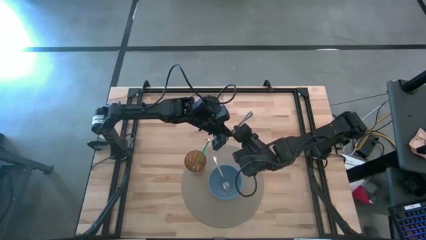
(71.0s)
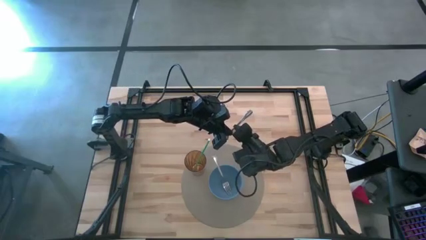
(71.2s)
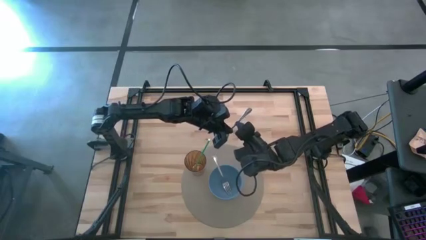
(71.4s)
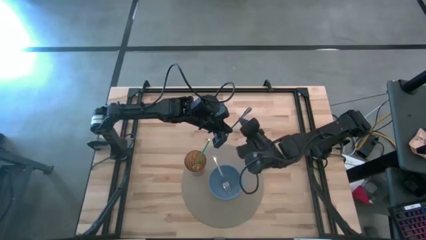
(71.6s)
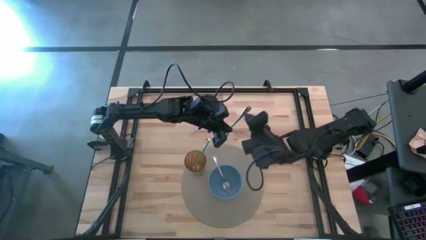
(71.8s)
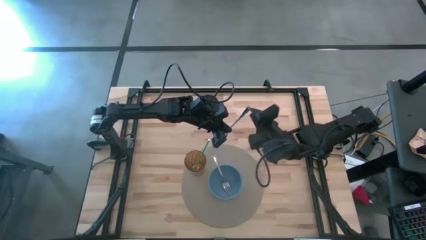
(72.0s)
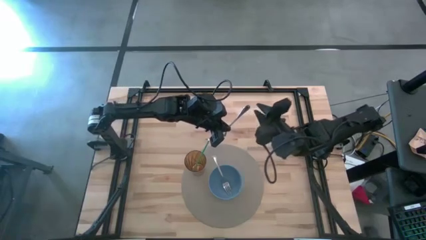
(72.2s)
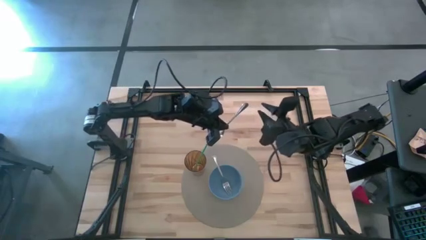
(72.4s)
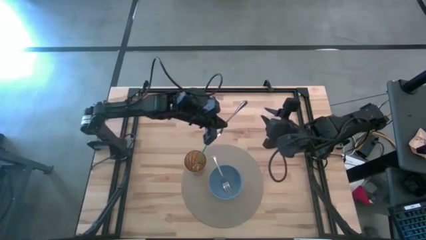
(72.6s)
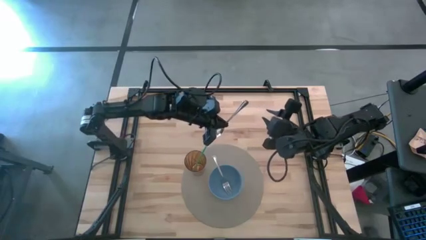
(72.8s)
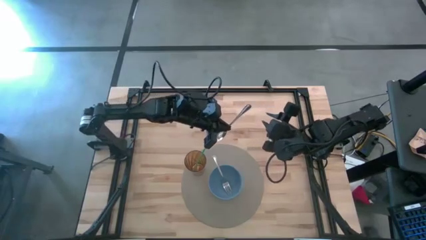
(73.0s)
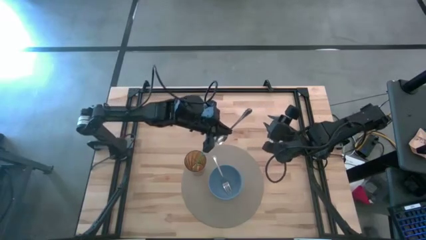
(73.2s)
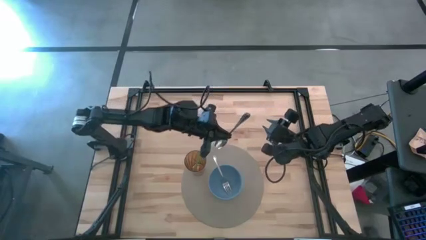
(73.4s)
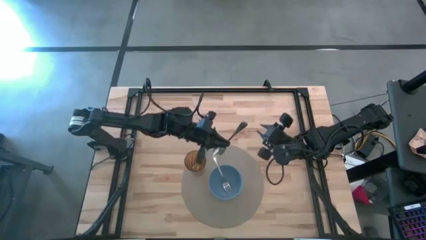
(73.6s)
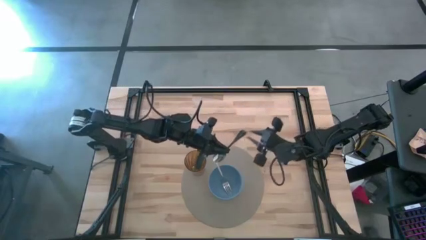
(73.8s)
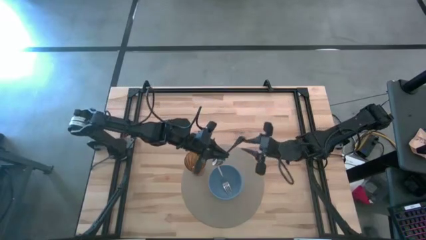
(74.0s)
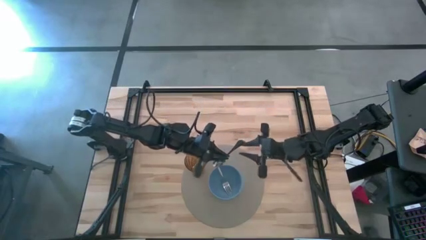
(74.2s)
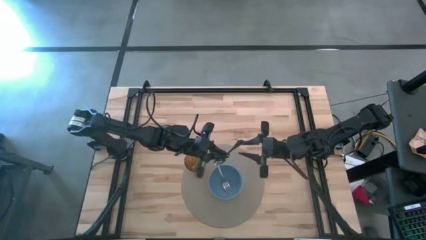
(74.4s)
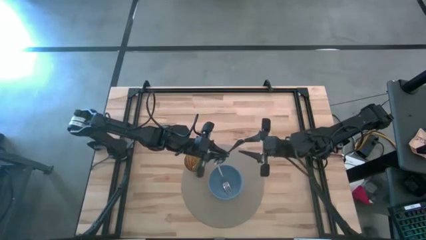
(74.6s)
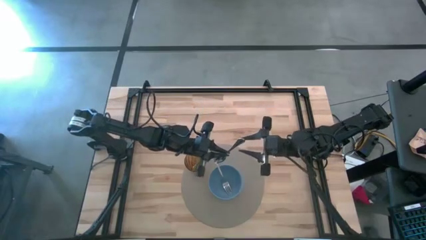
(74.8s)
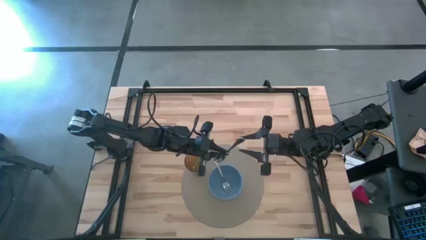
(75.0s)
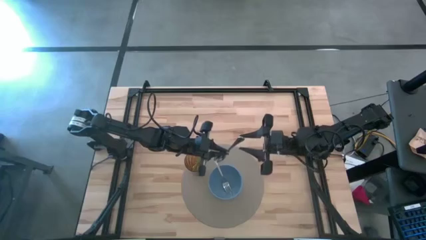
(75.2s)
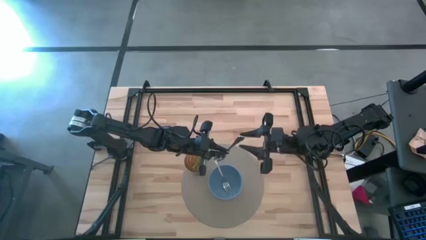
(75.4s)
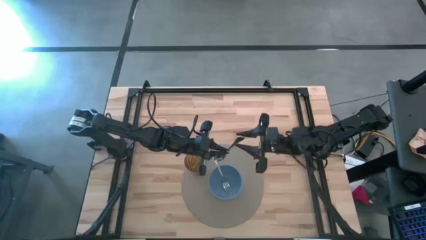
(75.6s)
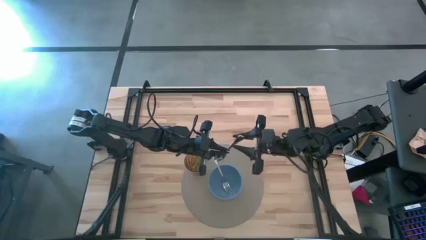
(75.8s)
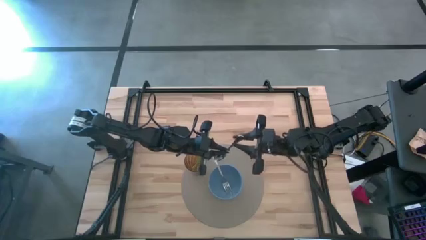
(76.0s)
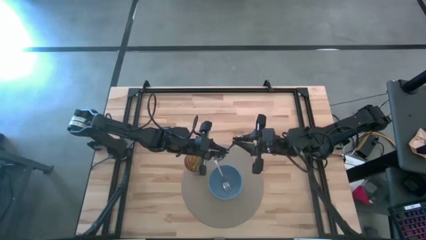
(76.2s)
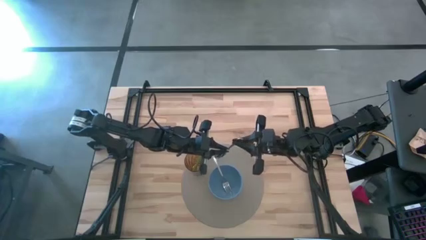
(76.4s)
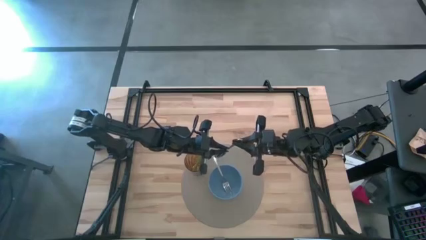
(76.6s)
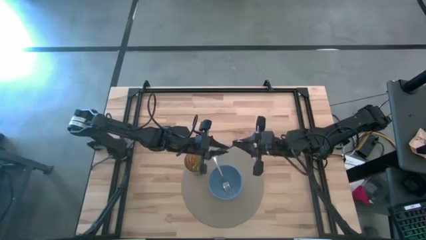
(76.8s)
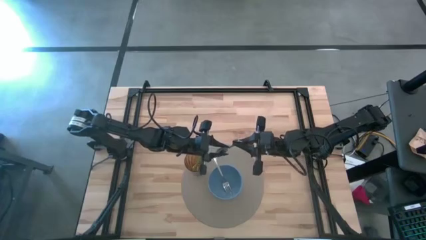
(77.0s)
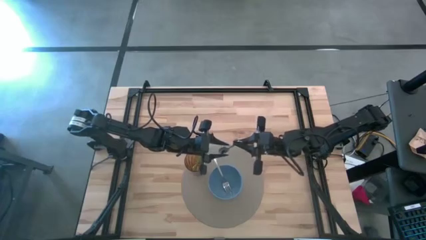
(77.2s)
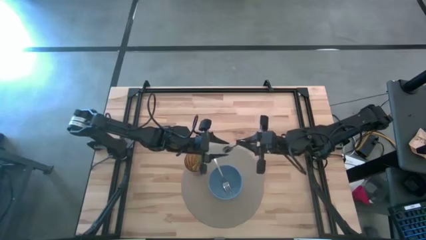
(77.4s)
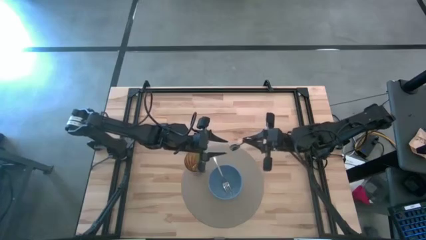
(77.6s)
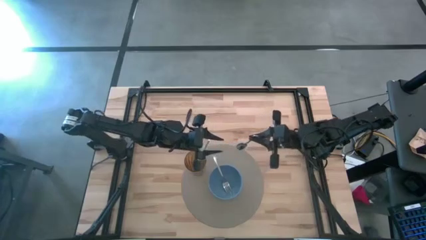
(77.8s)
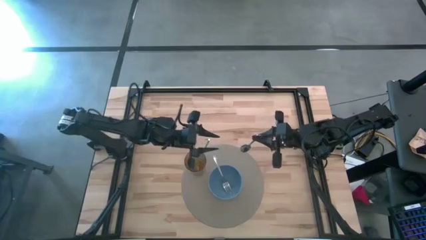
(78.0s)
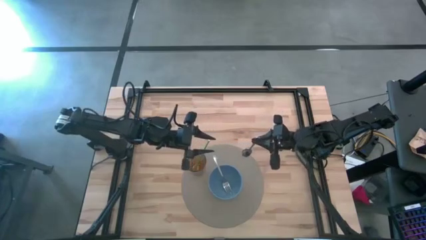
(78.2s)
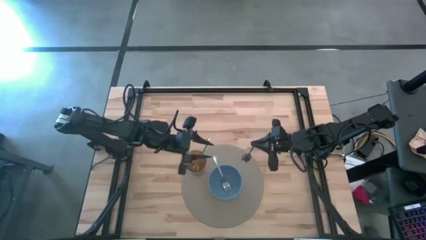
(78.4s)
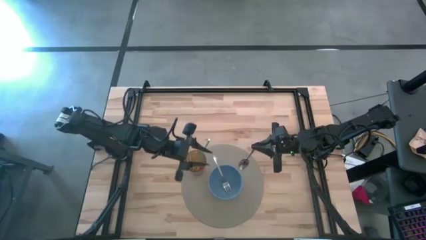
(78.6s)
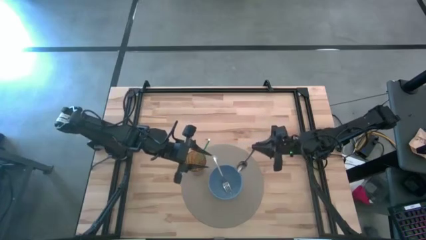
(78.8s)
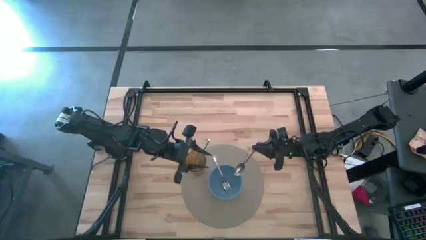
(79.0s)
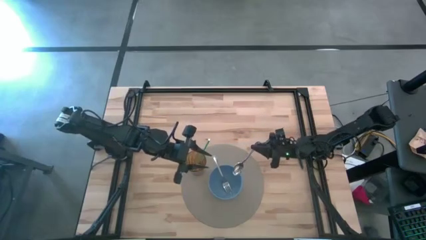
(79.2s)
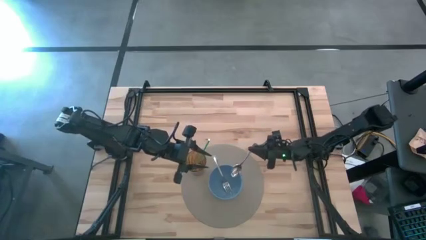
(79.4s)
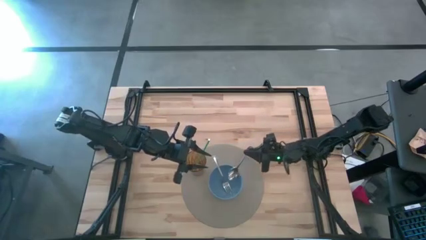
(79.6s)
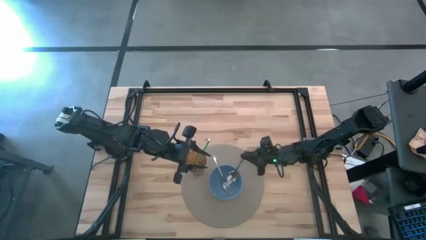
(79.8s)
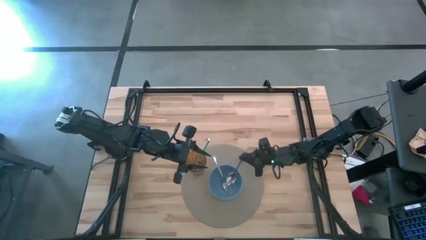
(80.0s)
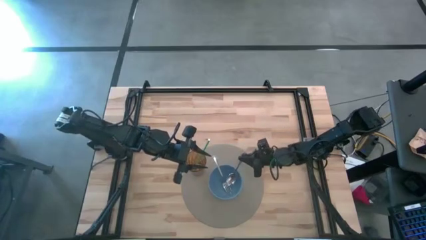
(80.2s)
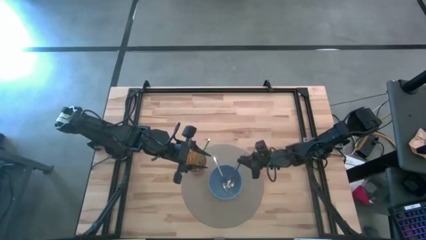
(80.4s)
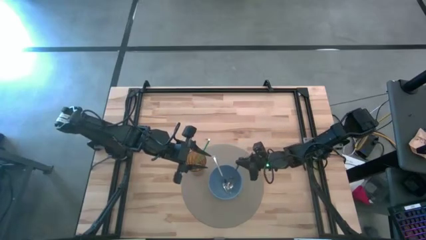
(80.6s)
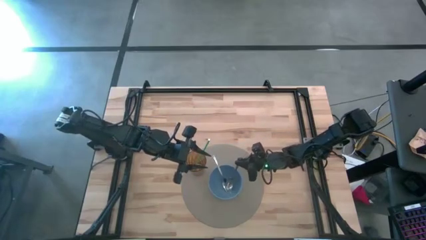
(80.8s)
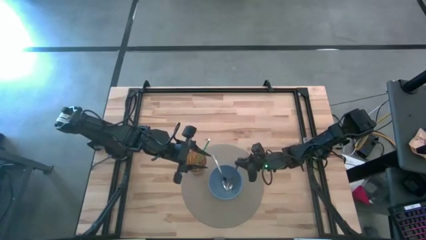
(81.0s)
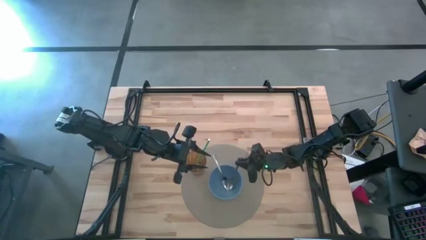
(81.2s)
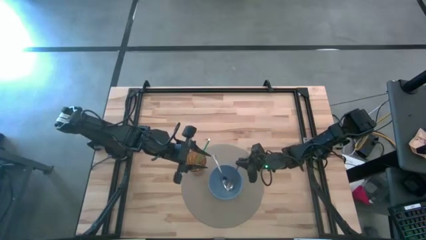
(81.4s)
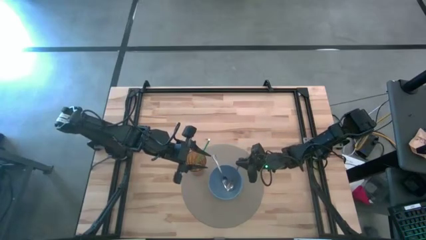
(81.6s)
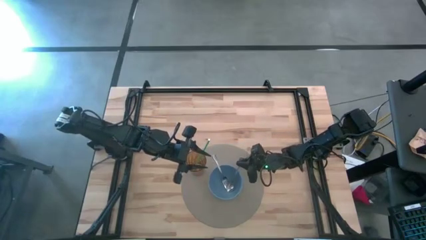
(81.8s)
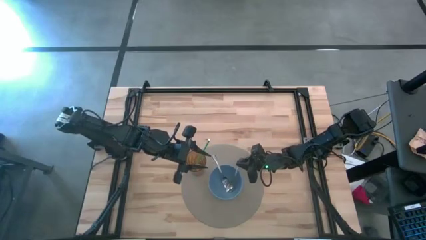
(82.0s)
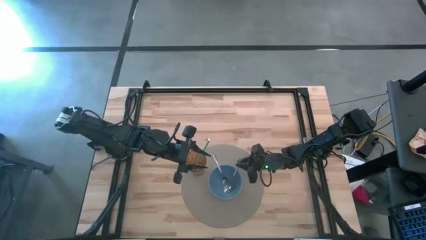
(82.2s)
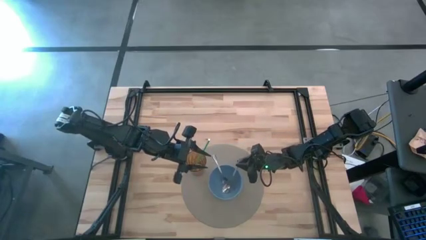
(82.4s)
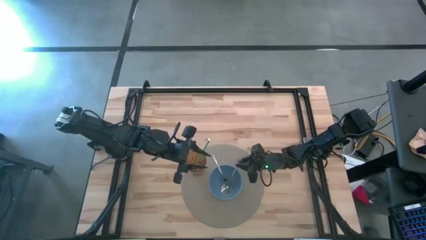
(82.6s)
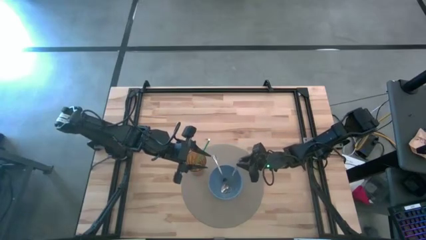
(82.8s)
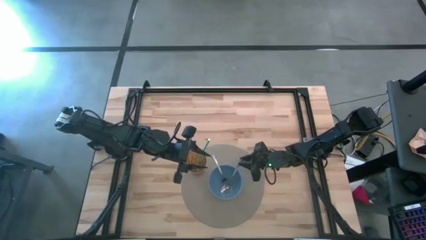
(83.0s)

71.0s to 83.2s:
Task: Pick & Place Utensil
Put the spoon into the bowl on the place mat

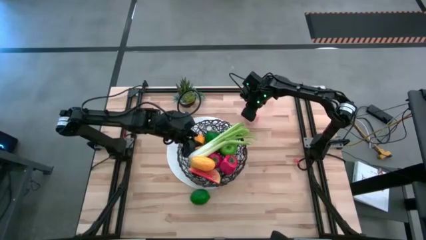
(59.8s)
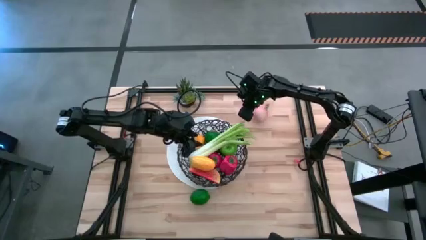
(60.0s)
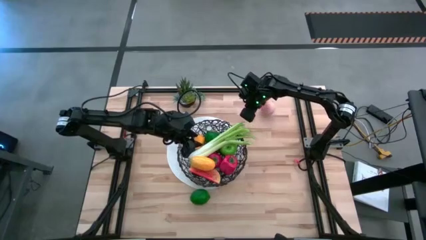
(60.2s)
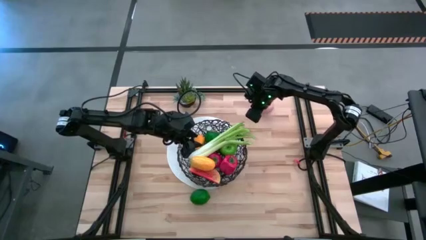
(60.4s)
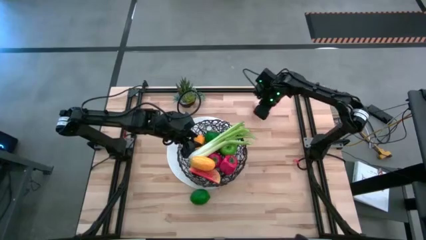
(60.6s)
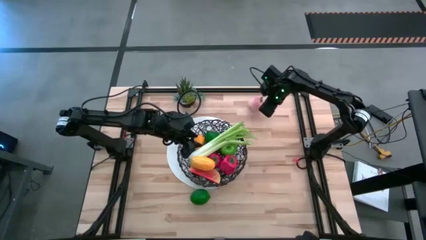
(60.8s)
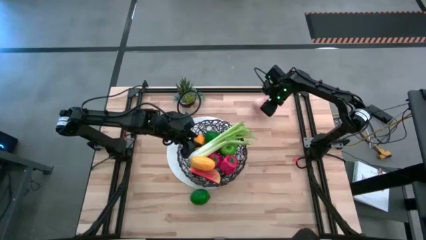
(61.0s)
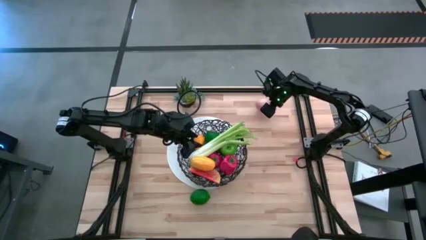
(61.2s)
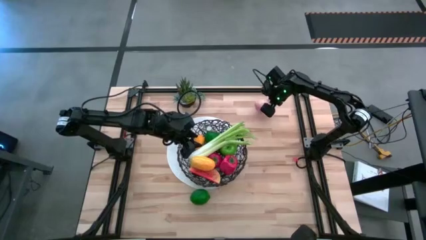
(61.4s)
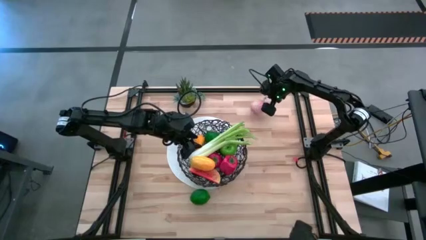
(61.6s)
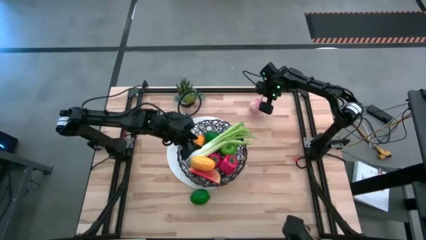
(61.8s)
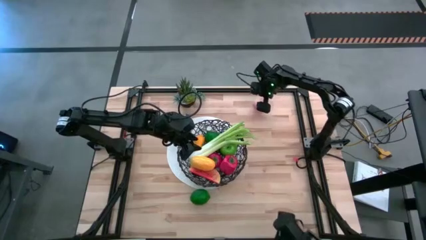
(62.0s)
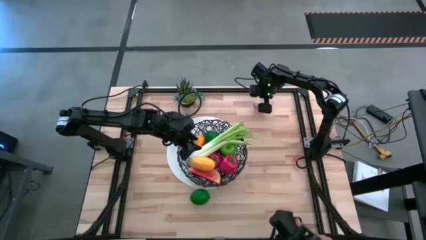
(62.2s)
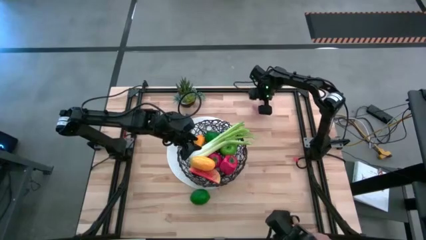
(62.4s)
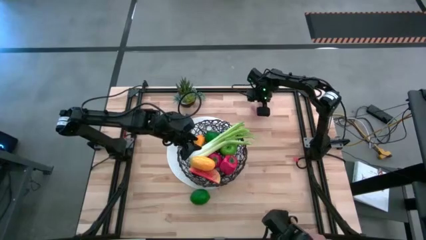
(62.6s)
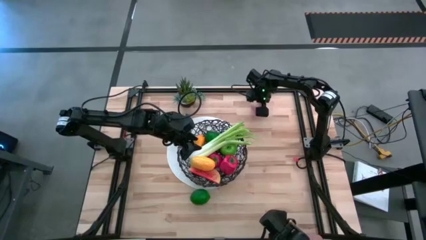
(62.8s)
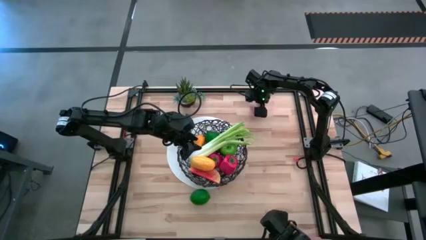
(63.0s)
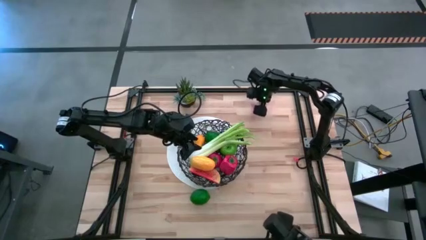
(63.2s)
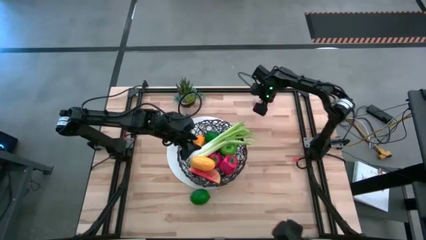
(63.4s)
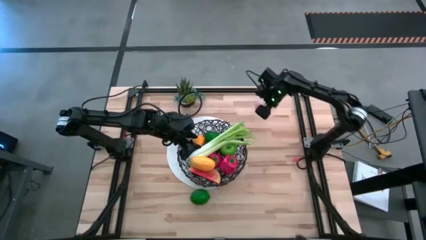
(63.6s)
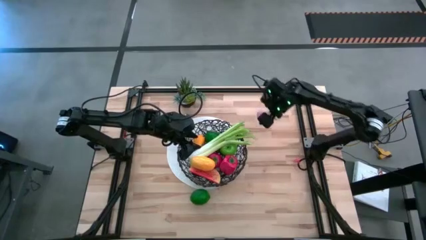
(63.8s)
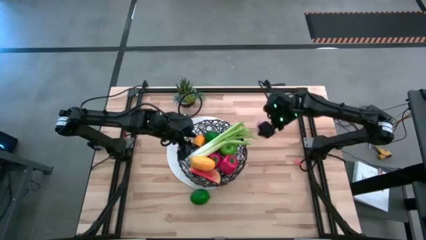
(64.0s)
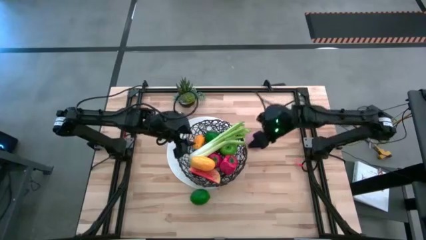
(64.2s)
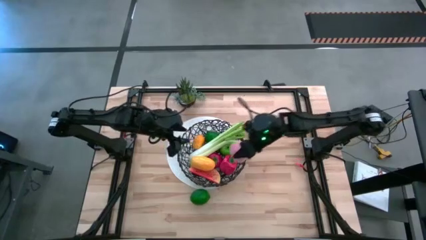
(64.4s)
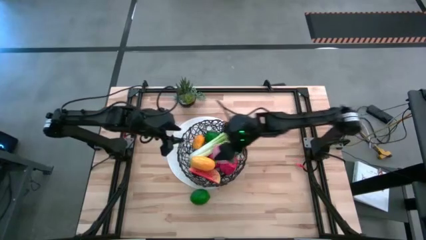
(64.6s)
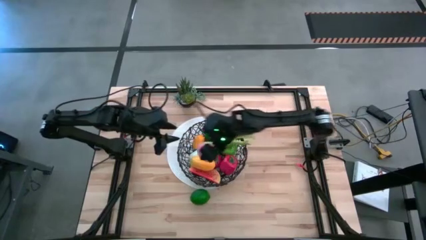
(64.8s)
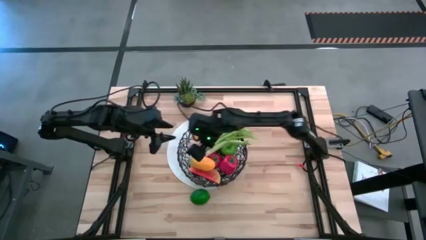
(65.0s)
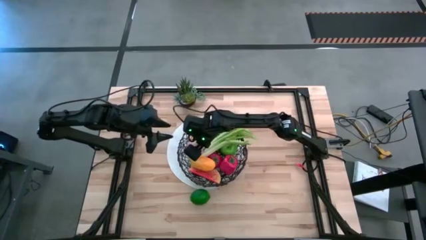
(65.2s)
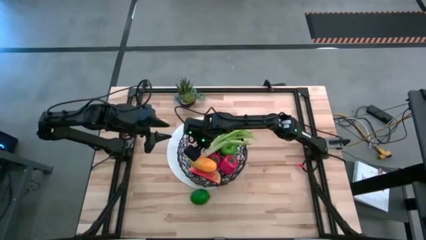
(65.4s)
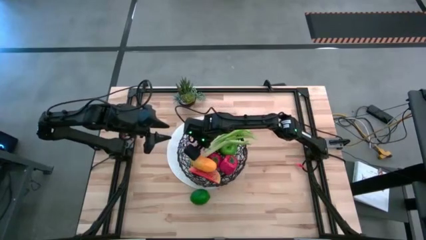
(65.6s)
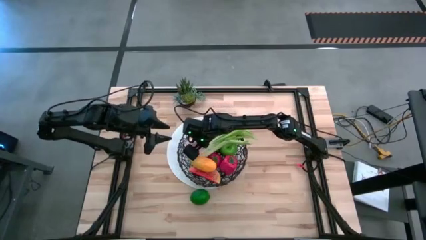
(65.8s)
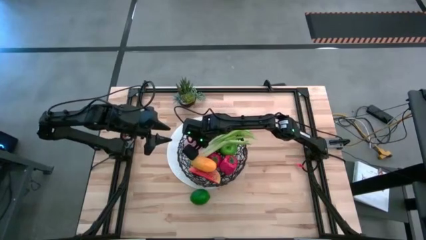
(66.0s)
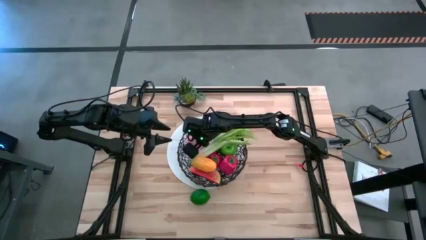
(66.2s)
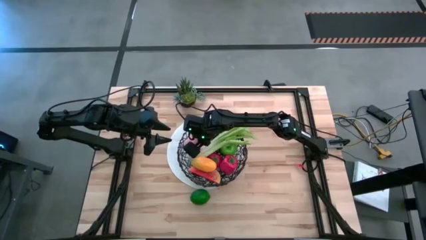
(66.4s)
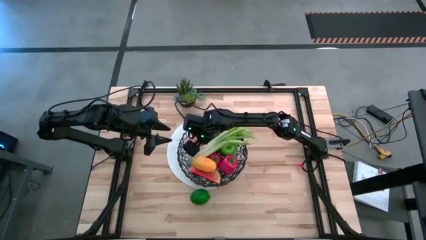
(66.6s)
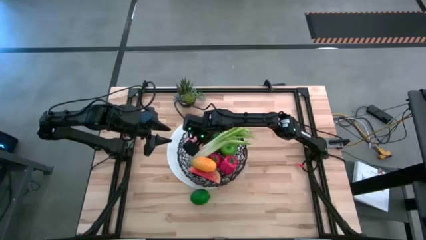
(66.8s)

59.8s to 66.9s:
Task: Build produce basket
Put the pink peach into the wire basket
